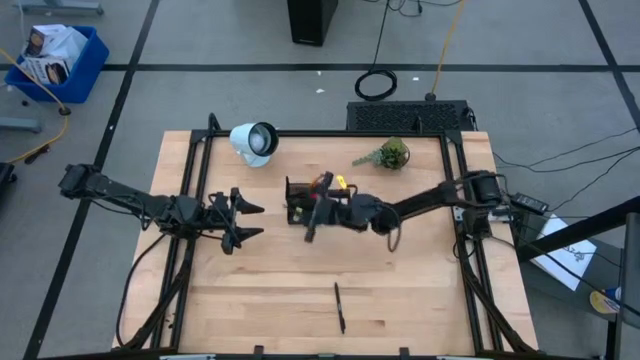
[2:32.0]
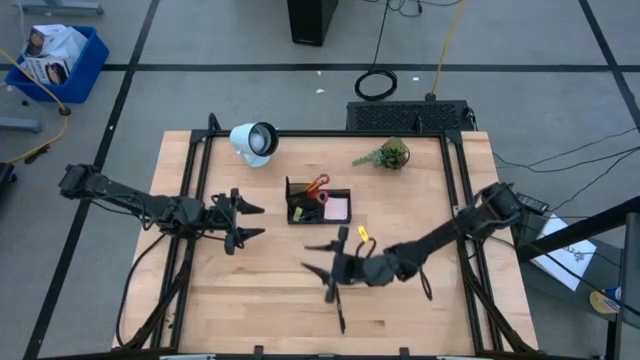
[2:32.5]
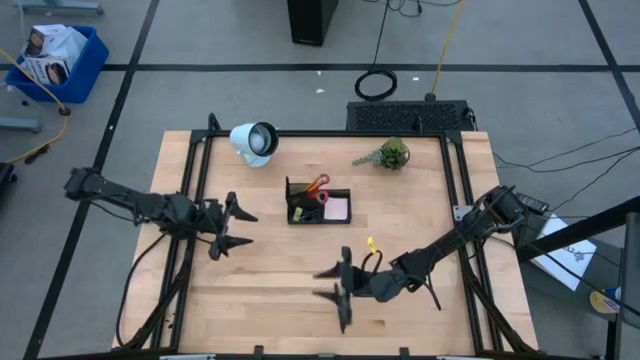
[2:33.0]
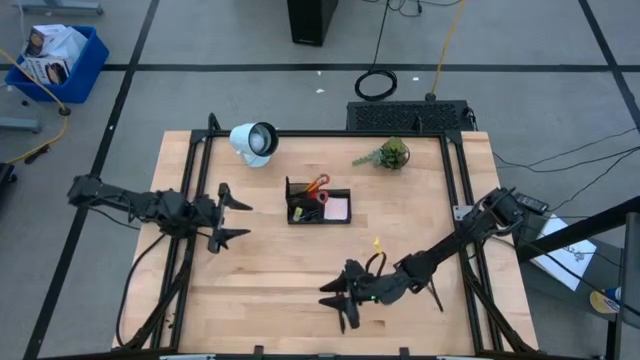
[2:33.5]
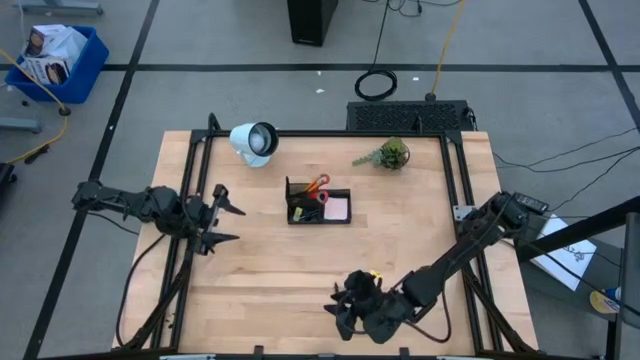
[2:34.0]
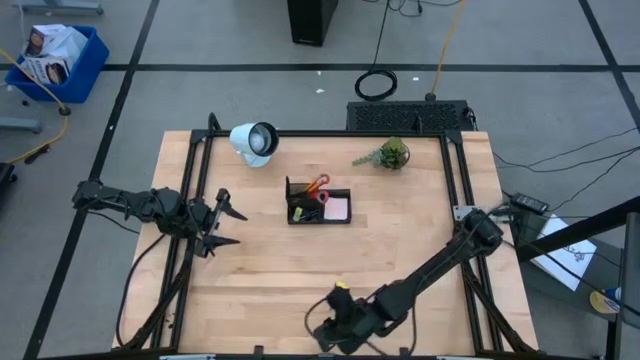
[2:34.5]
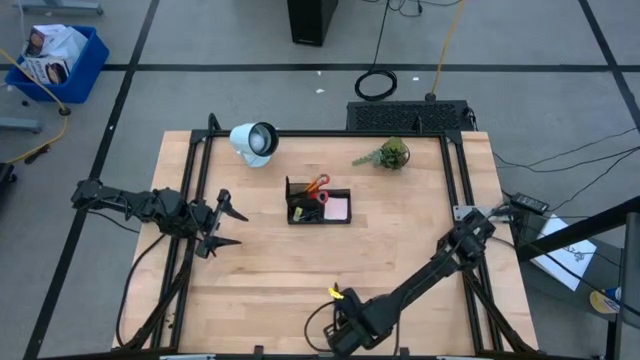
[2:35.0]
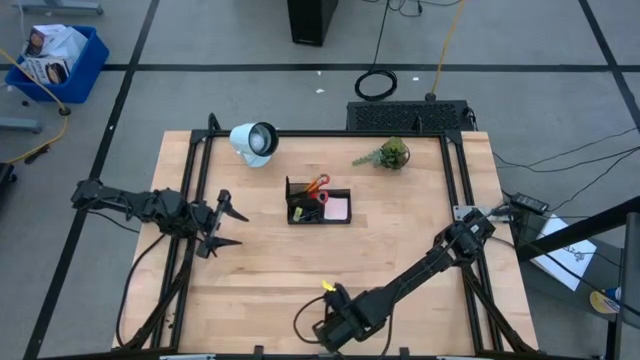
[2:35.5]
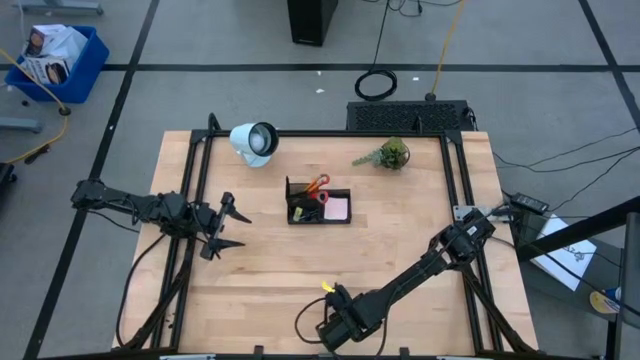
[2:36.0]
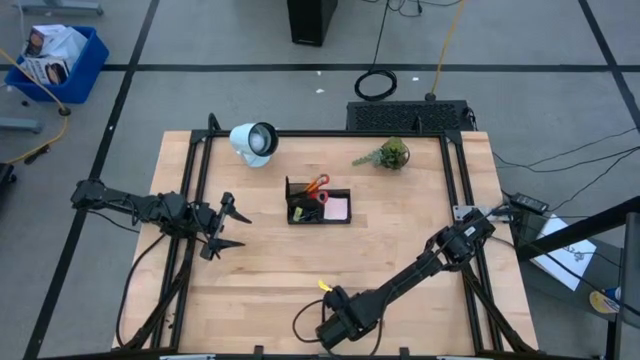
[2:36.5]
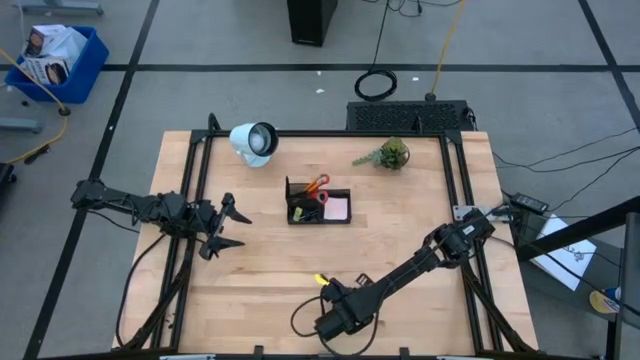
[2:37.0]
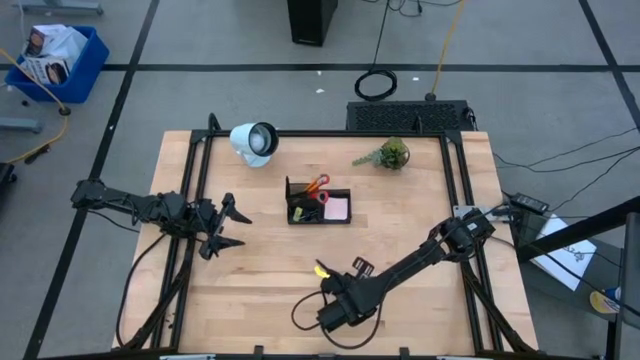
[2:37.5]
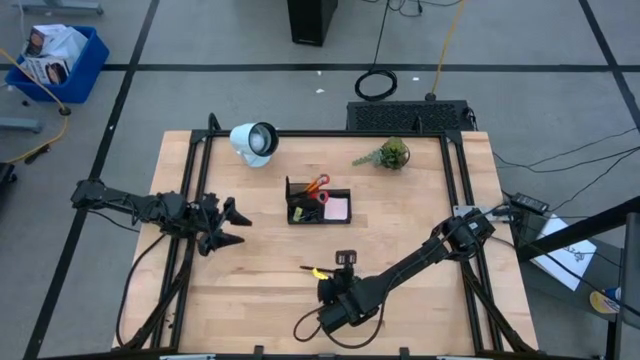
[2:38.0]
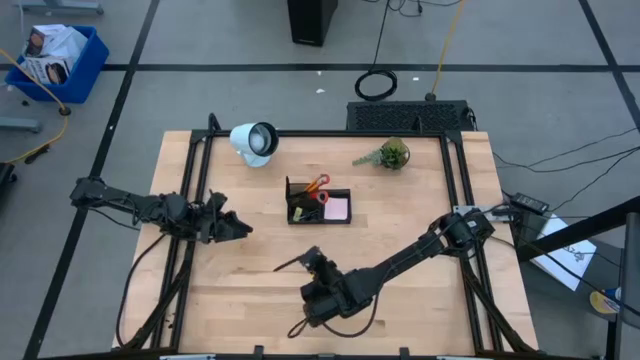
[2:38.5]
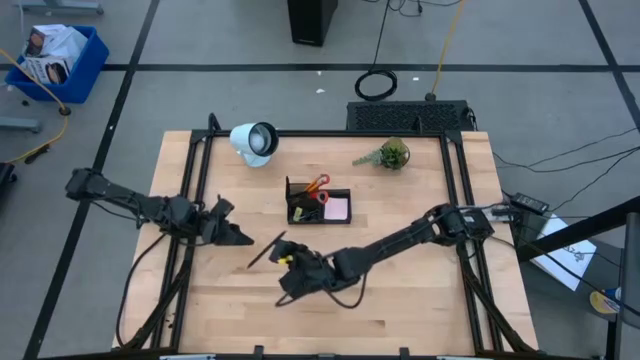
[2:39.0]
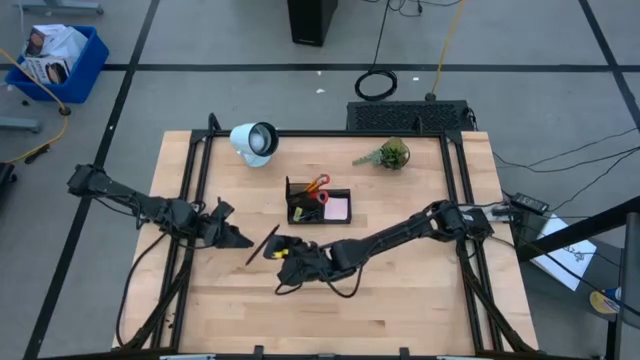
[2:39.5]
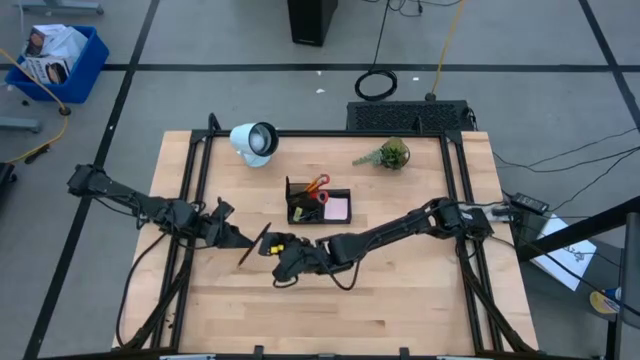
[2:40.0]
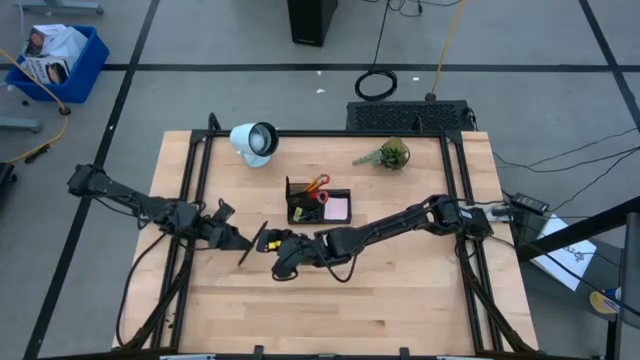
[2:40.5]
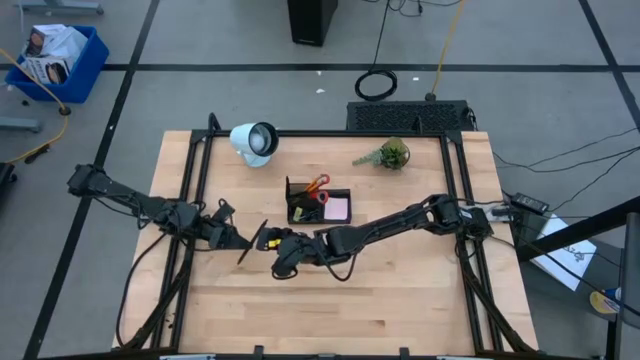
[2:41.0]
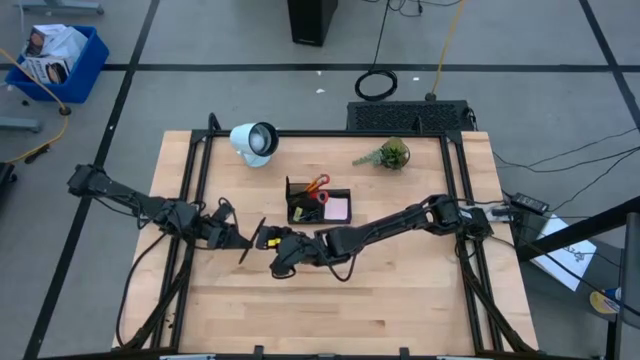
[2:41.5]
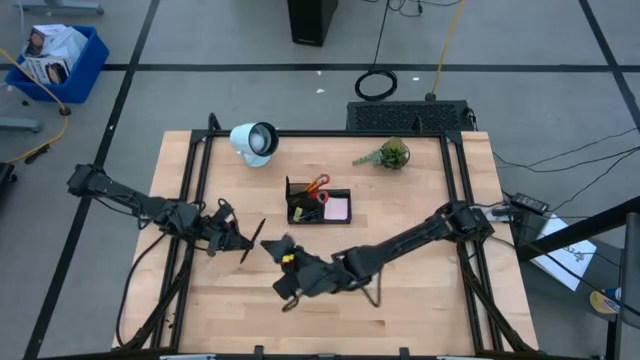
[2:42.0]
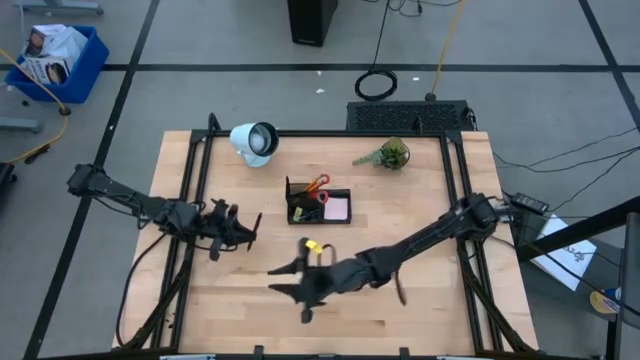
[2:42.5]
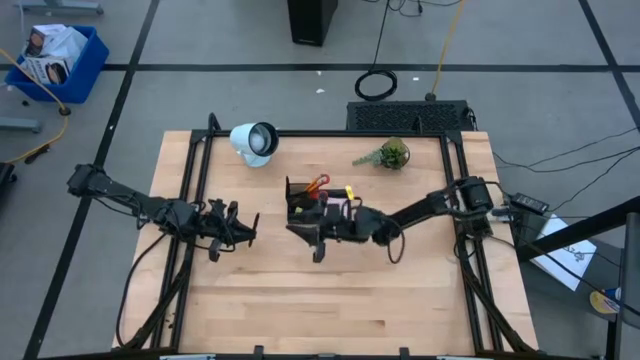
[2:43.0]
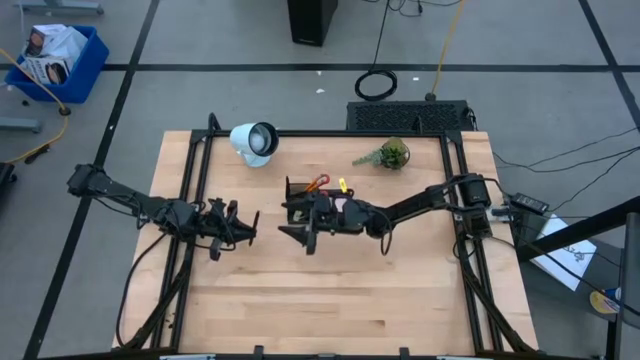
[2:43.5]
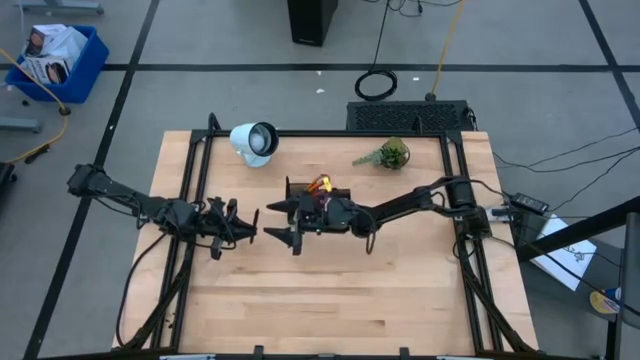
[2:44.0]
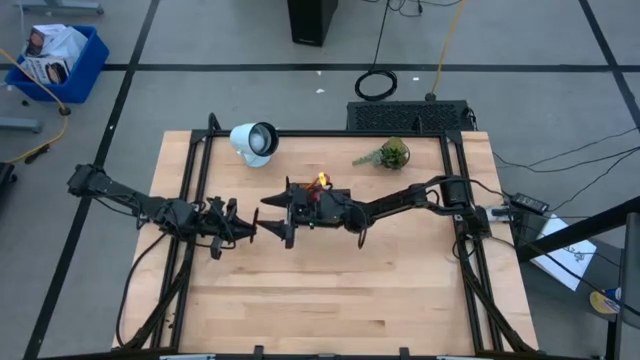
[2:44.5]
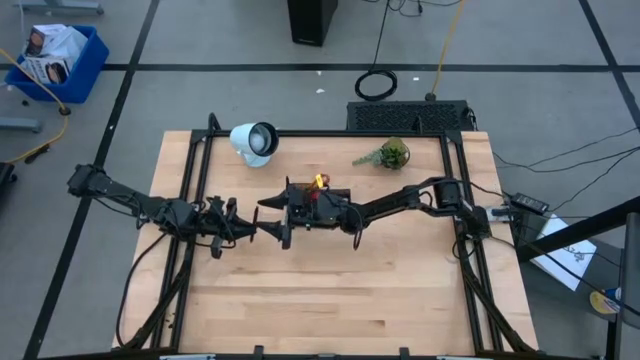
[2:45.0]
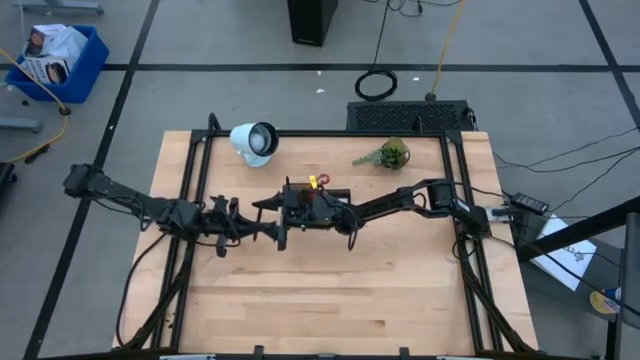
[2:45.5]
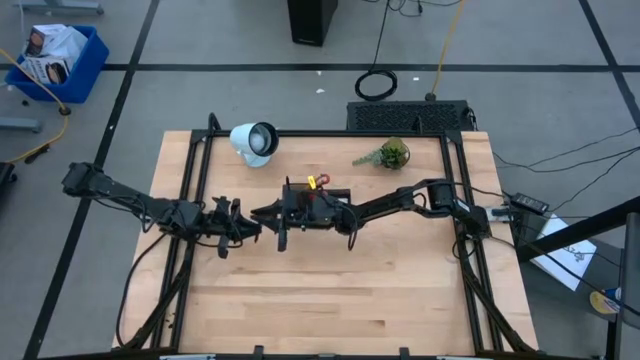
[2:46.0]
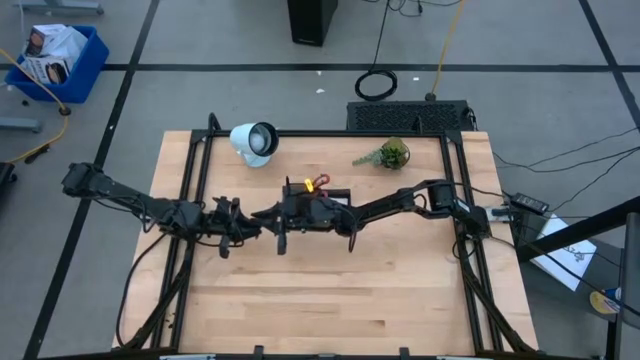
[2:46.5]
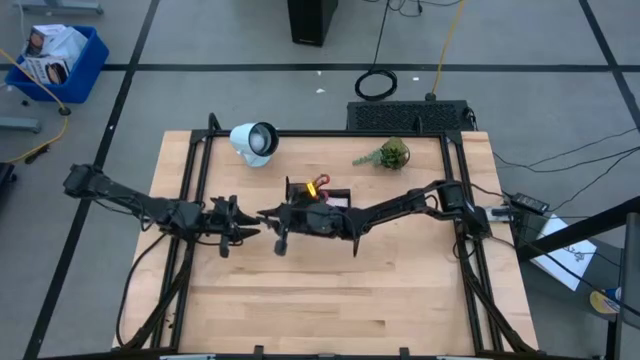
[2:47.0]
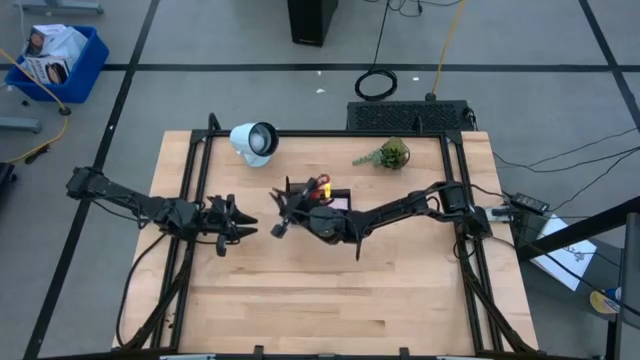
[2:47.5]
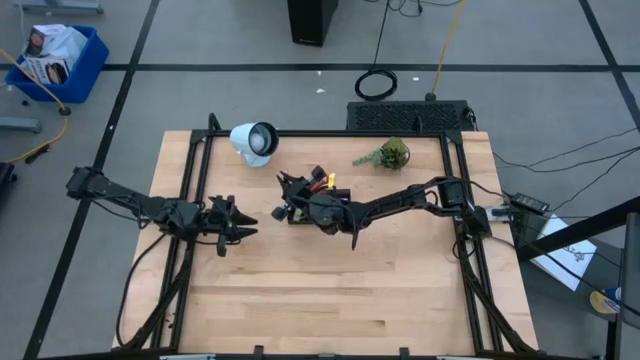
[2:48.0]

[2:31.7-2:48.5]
Task: Pick and place office supplies into organizer
Put the black pen into the black desk organizer

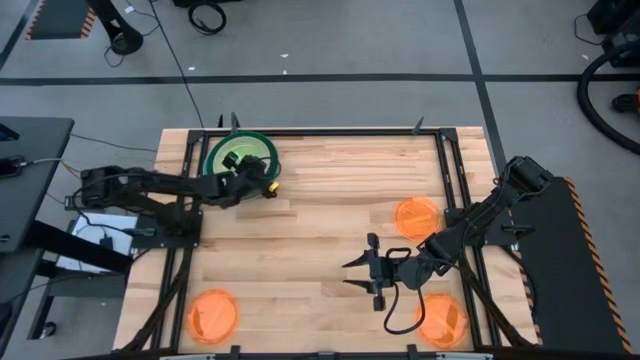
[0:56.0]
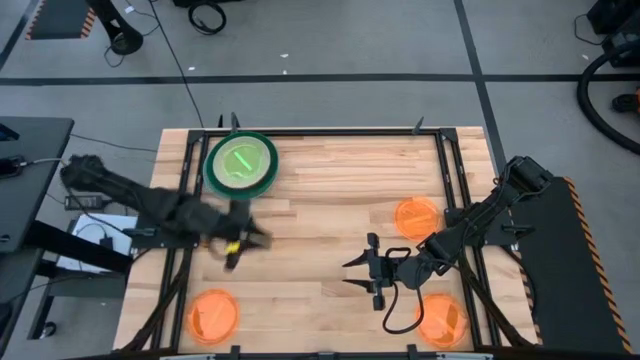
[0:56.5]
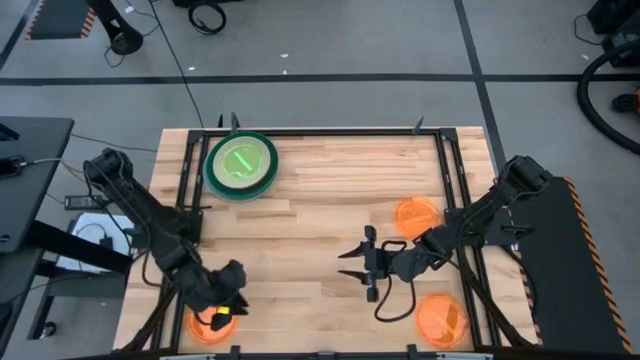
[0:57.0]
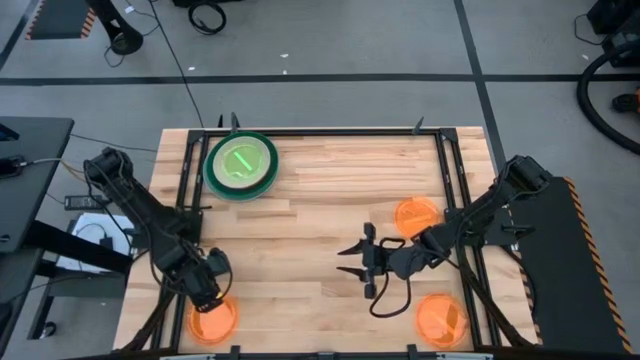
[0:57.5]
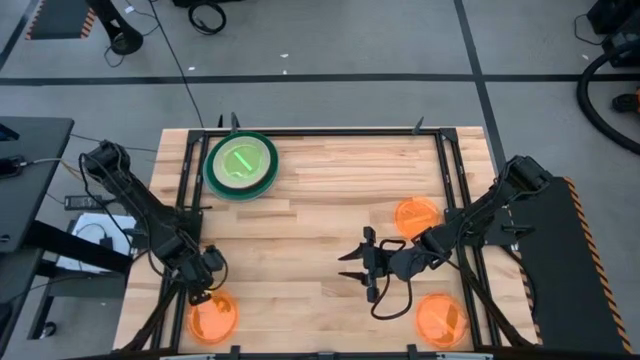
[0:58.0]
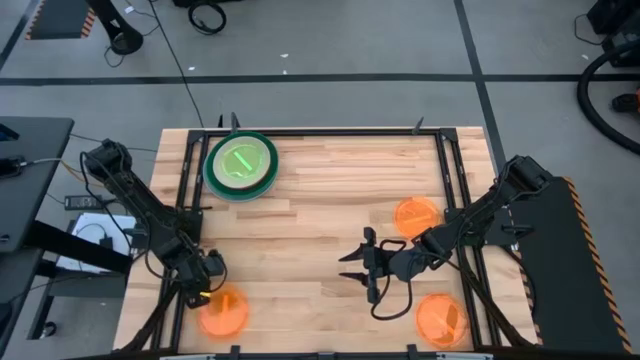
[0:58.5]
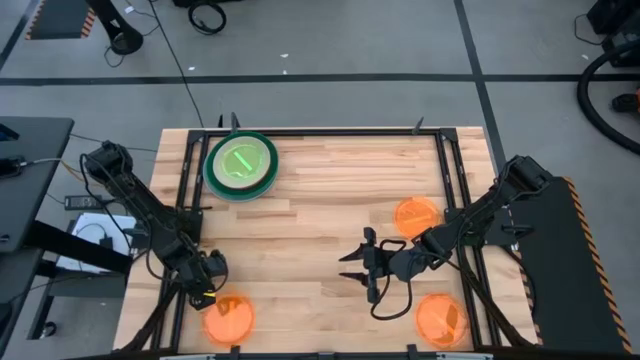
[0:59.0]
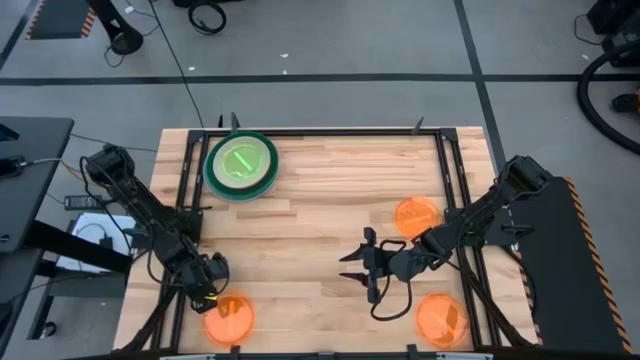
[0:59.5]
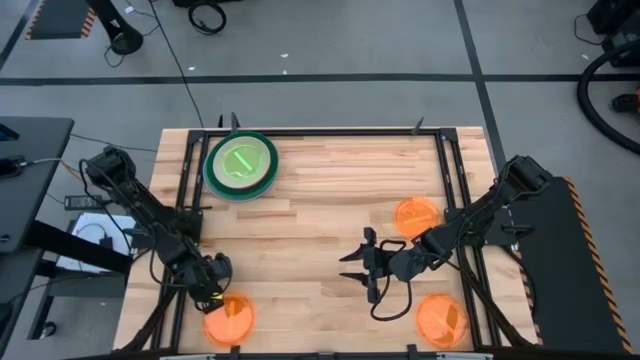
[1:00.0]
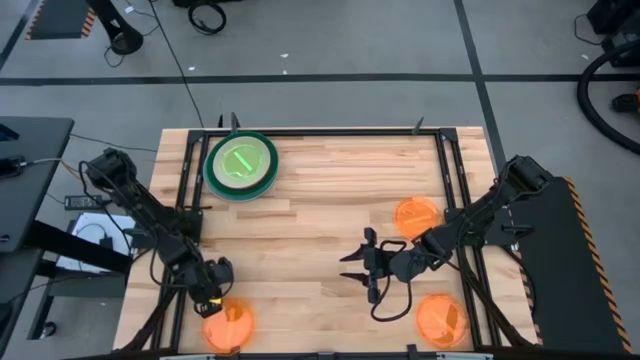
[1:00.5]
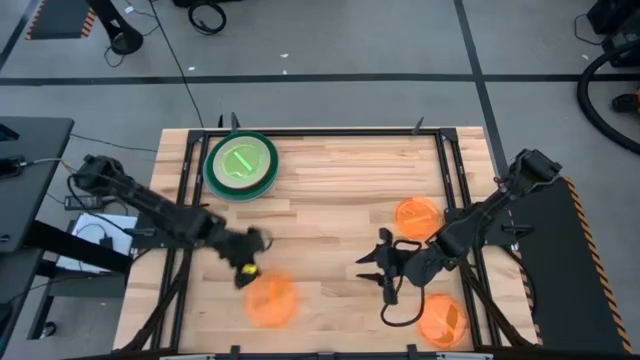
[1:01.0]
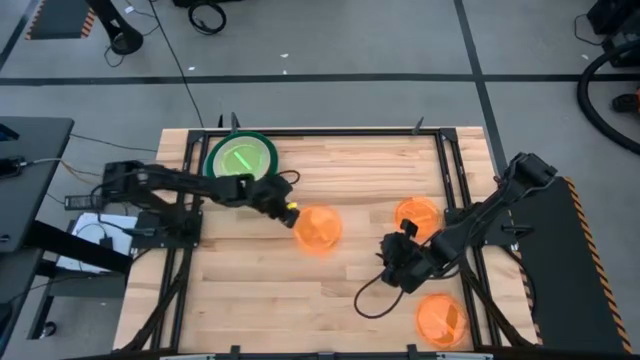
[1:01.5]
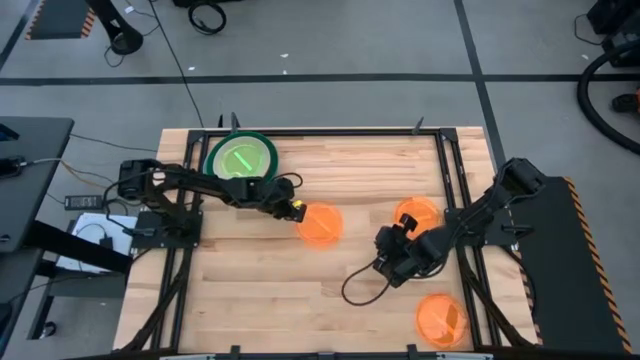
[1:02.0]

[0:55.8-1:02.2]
Task: Stack plastic plates
Move the bottom left light orange plate to the center of the table
